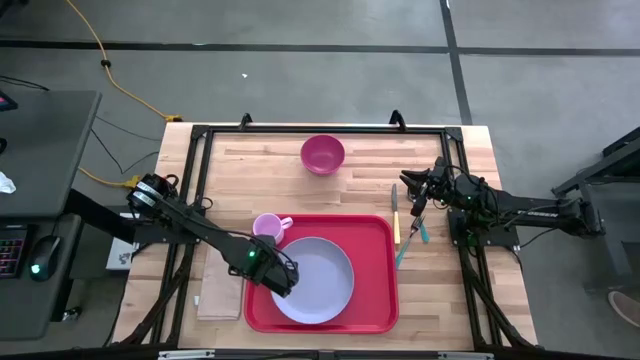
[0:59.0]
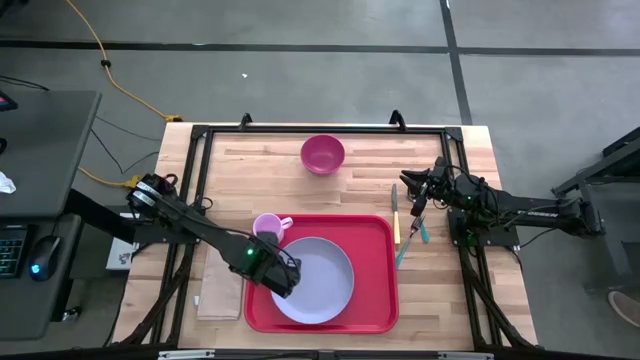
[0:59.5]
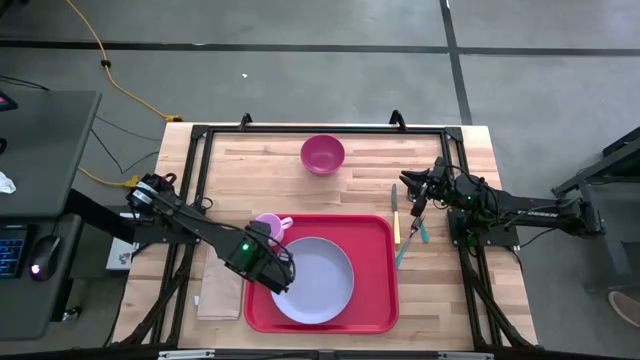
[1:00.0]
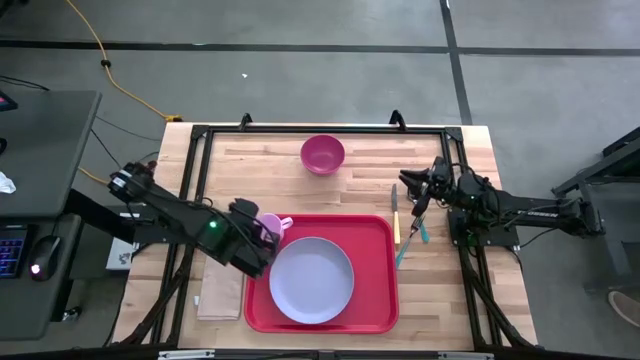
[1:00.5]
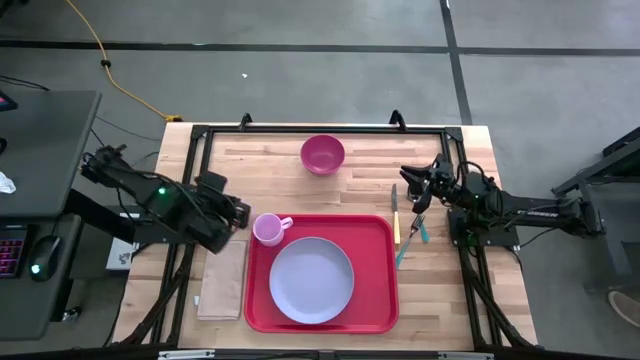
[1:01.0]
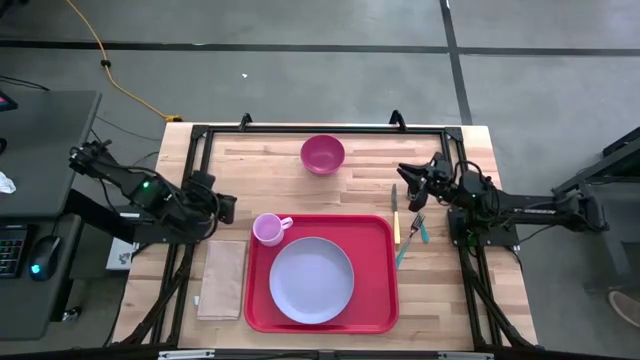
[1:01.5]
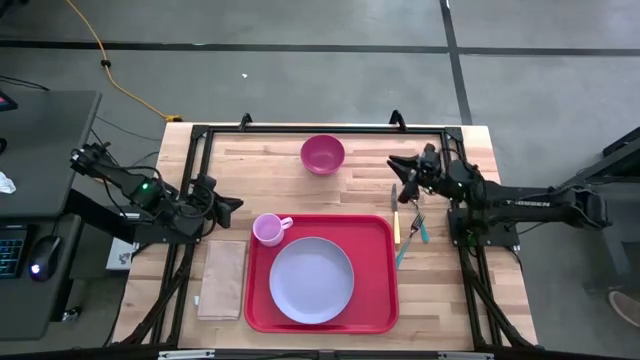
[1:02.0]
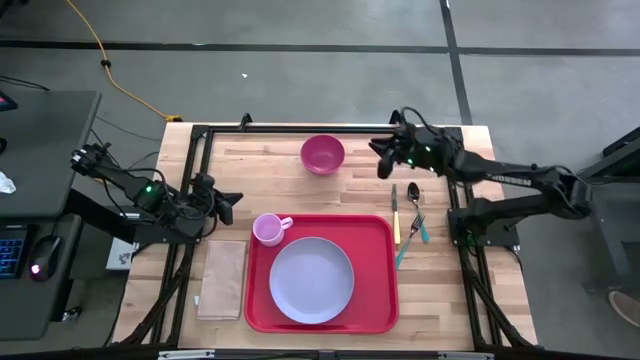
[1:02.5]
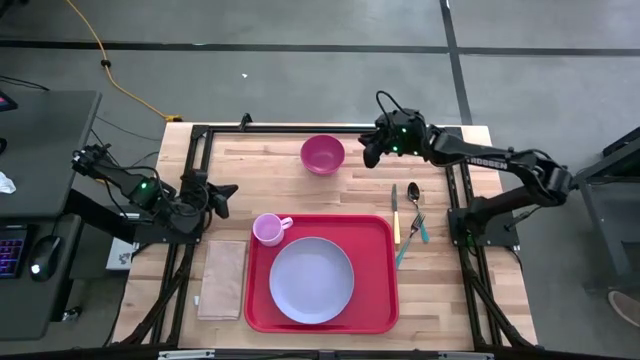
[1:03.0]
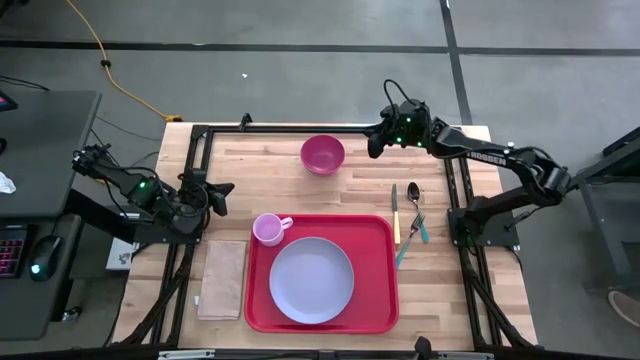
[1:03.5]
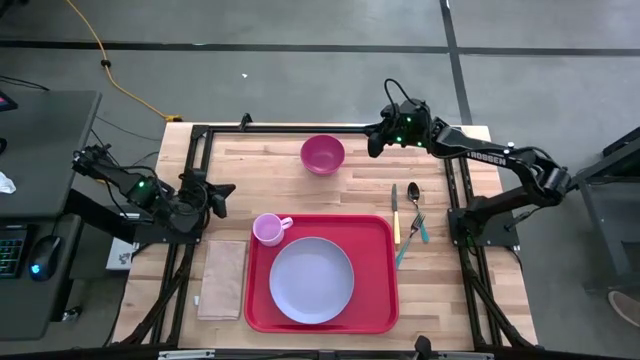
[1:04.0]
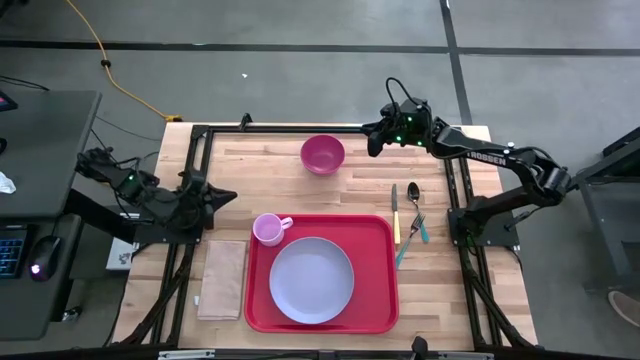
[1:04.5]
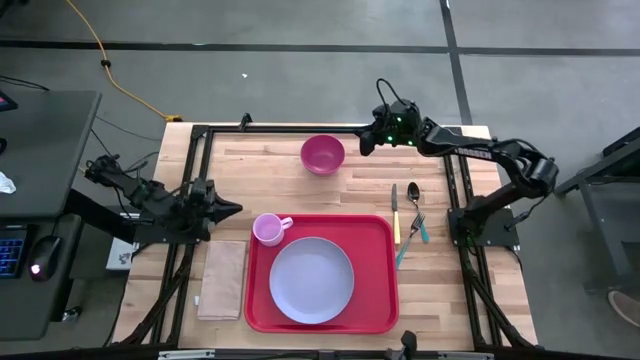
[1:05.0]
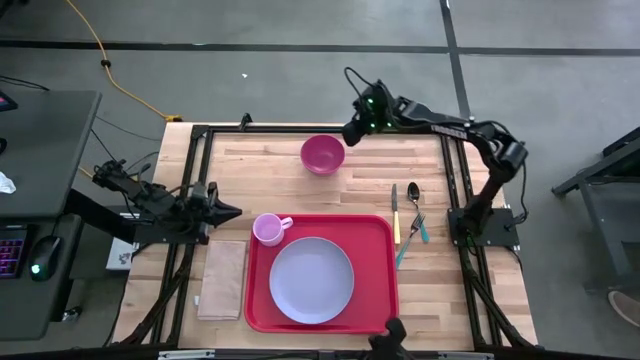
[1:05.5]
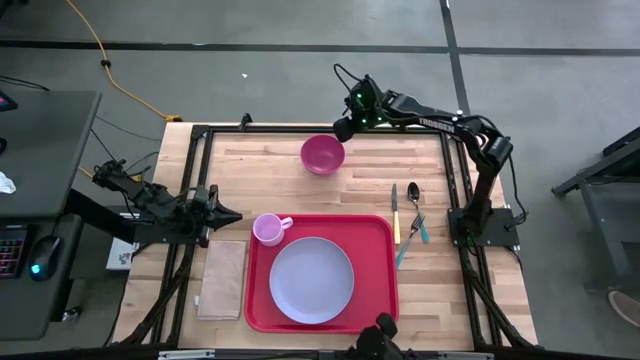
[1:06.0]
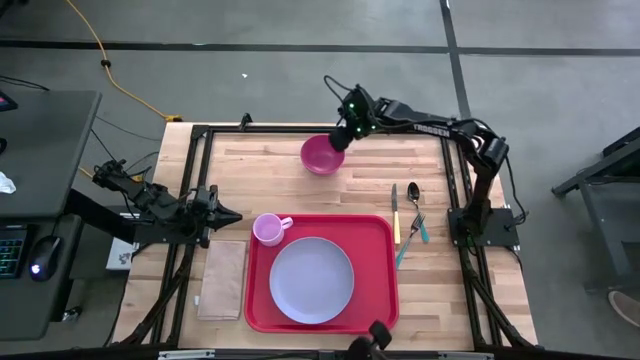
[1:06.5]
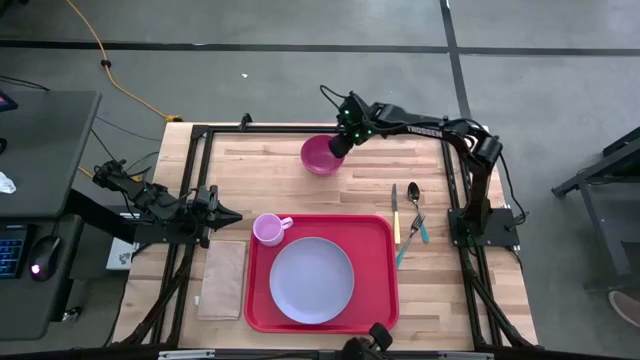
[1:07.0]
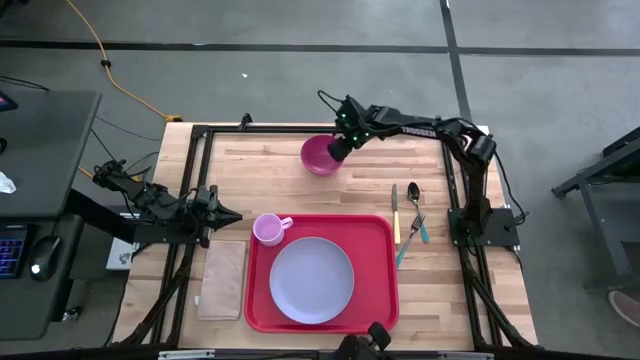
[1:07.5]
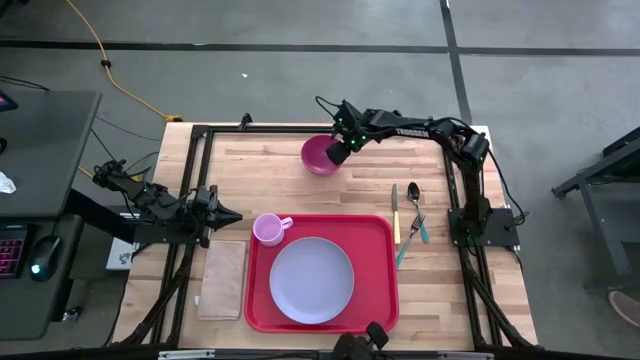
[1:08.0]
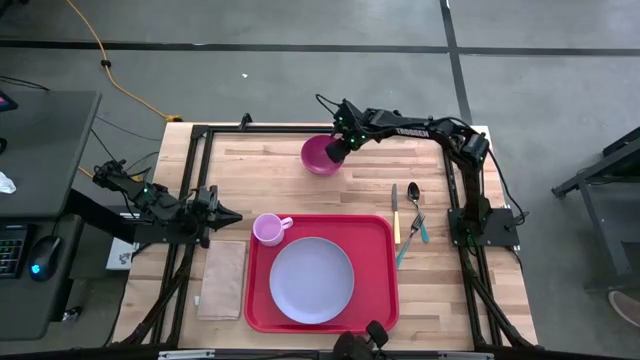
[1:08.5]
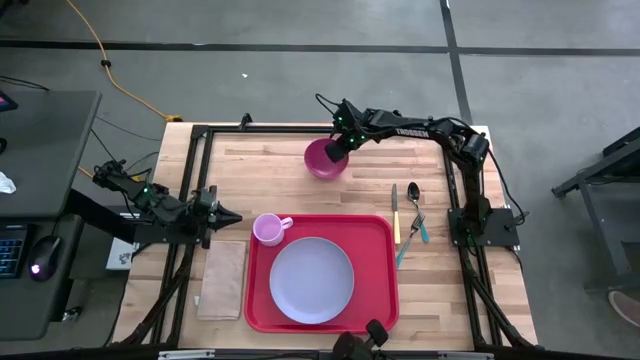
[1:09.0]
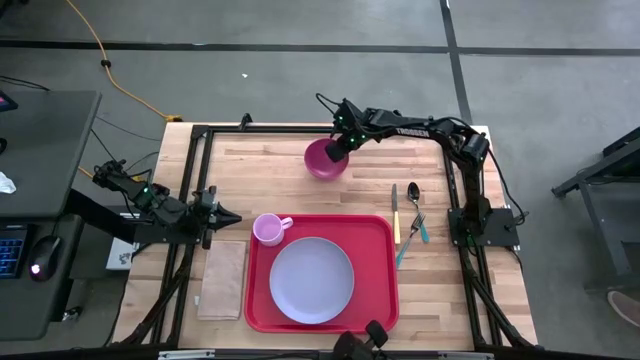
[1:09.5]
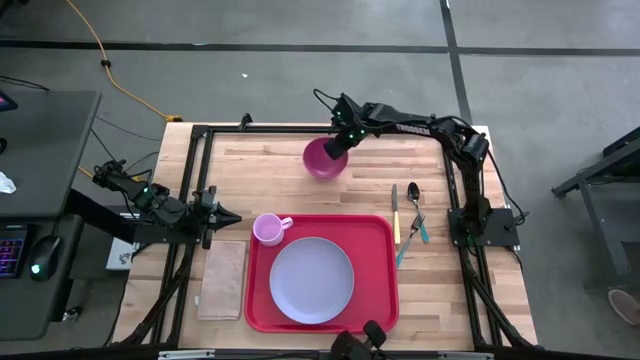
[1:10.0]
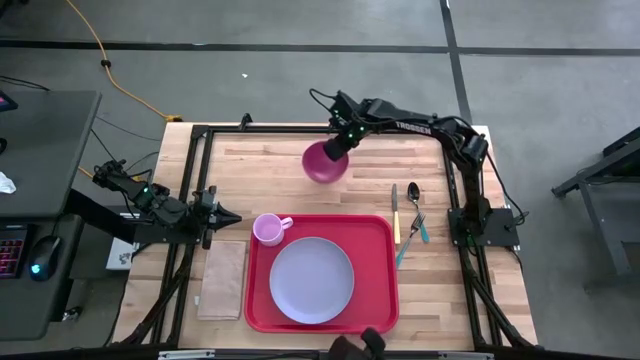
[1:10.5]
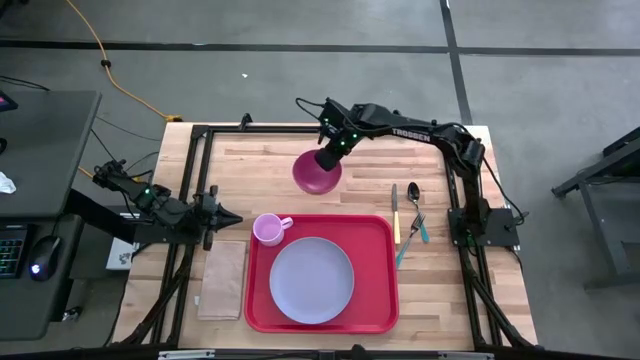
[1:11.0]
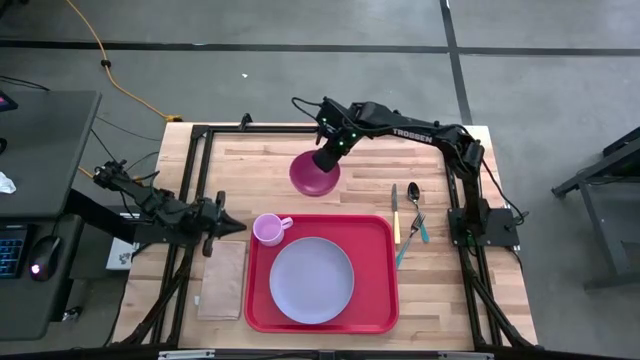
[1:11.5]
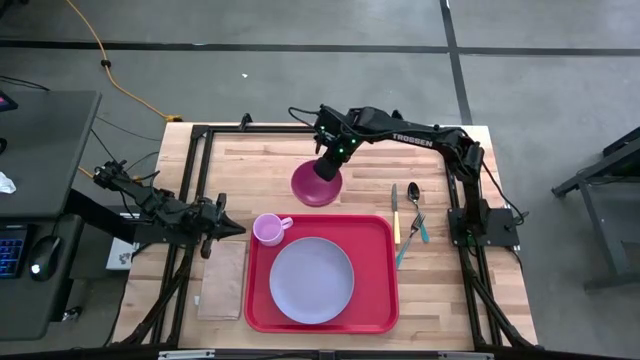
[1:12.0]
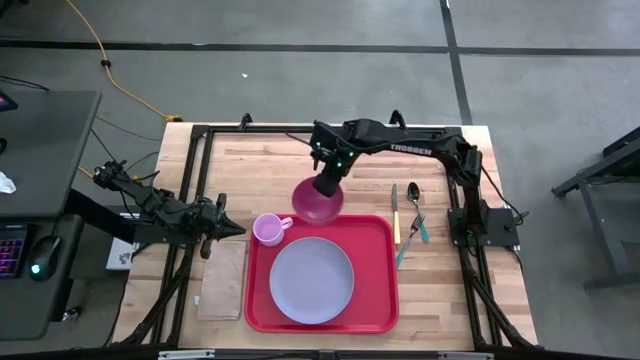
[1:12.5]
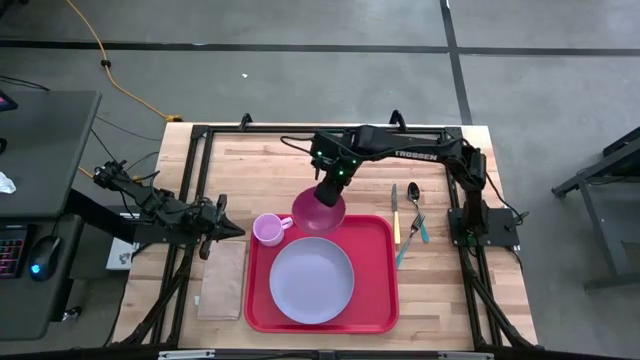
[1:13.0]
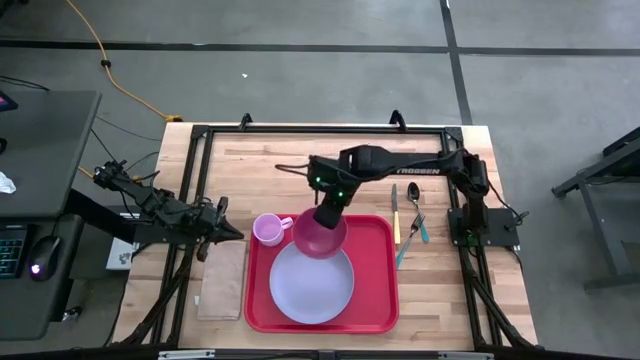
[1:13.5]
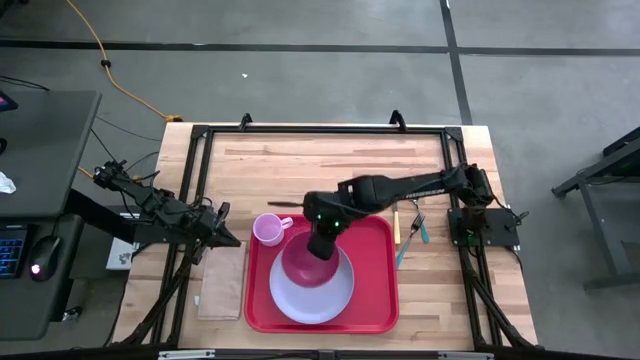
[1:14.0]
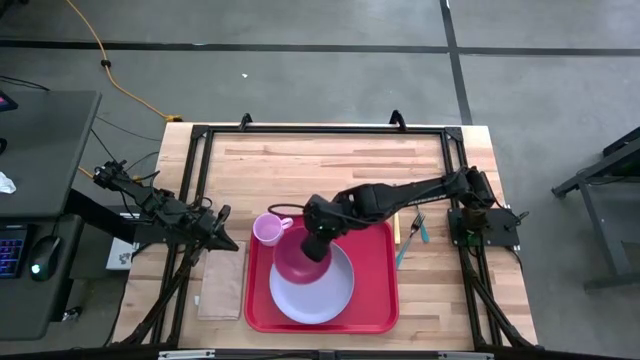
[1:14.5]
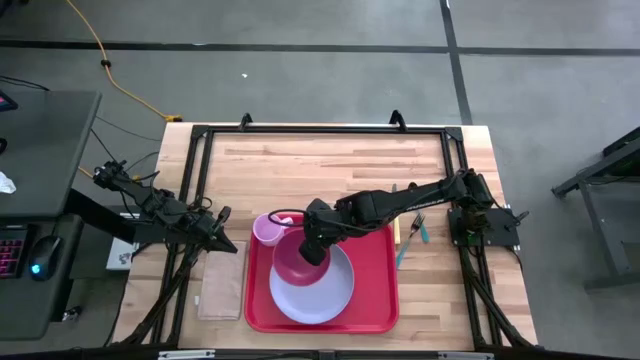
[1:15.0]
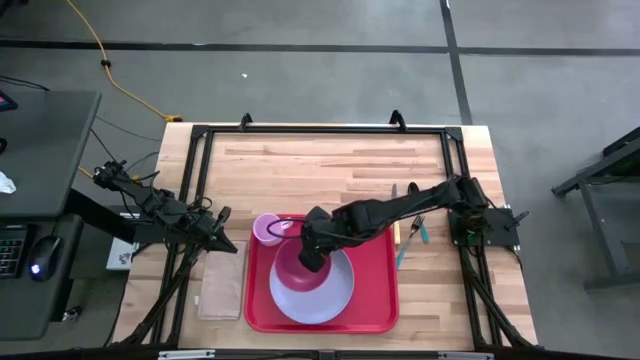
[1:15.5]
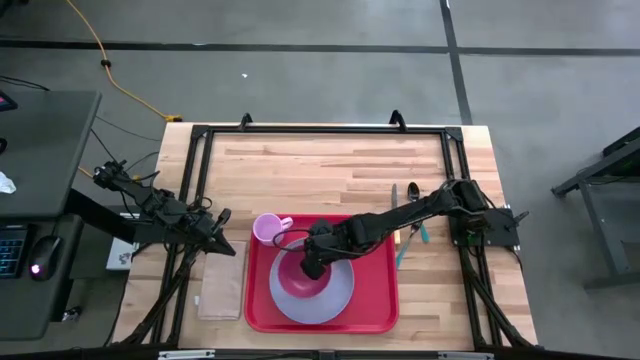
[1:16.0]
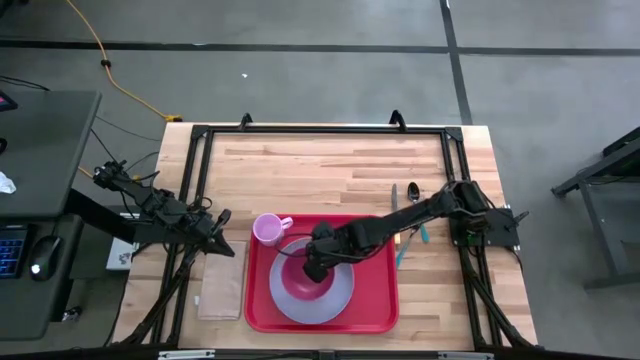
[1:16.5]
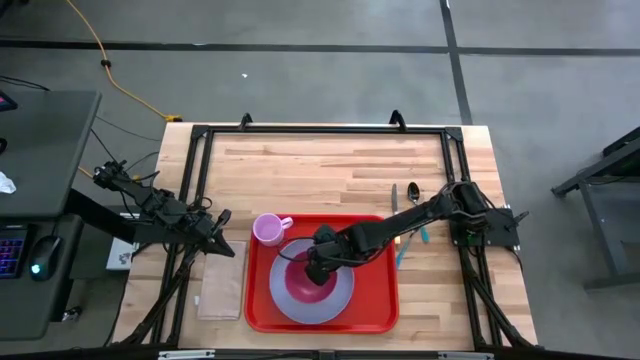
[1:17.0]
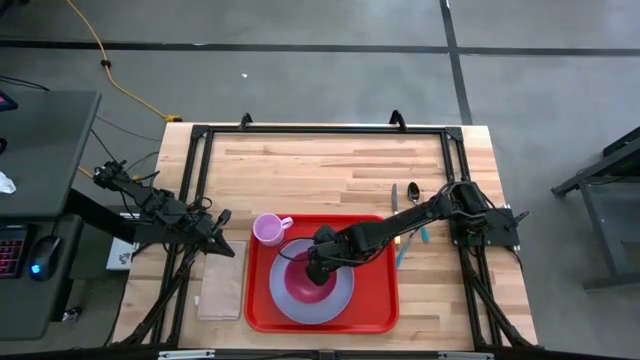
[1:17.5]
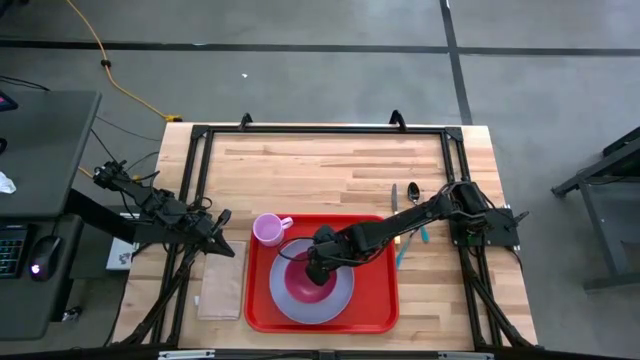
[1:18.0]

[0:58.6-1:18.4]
Task: Set up tray
Put the pink bowl on the purple plate

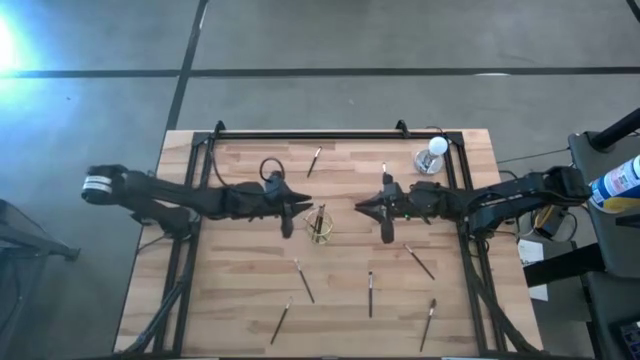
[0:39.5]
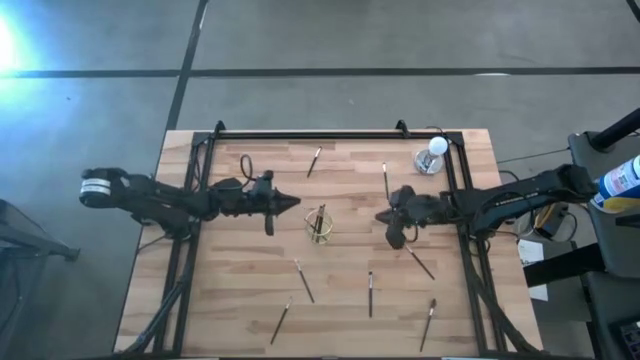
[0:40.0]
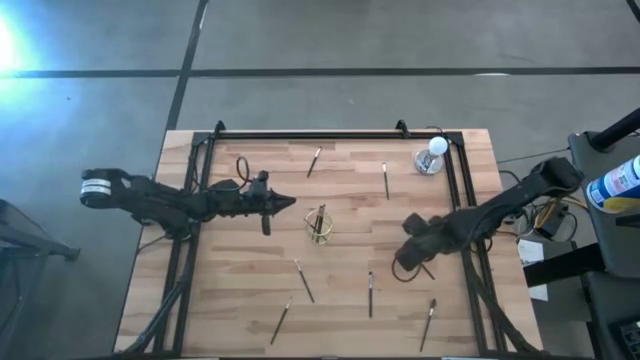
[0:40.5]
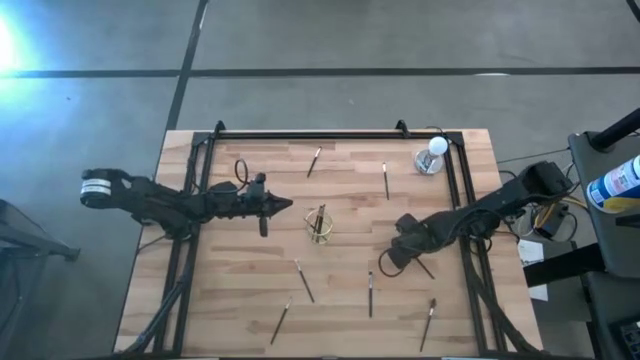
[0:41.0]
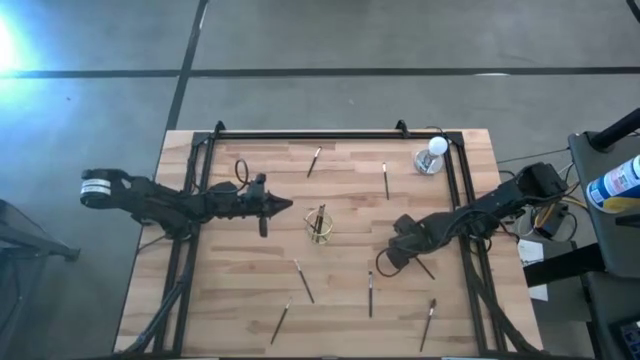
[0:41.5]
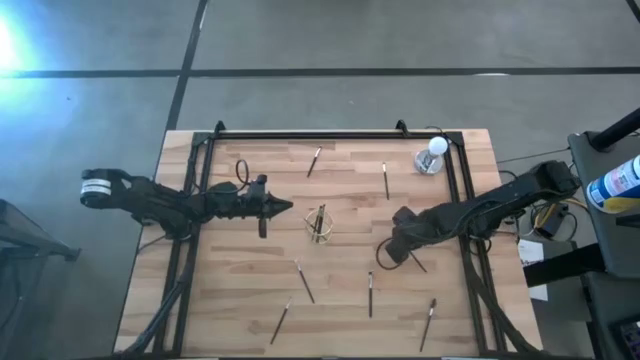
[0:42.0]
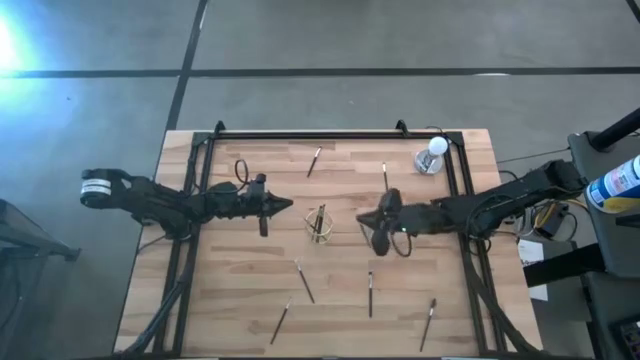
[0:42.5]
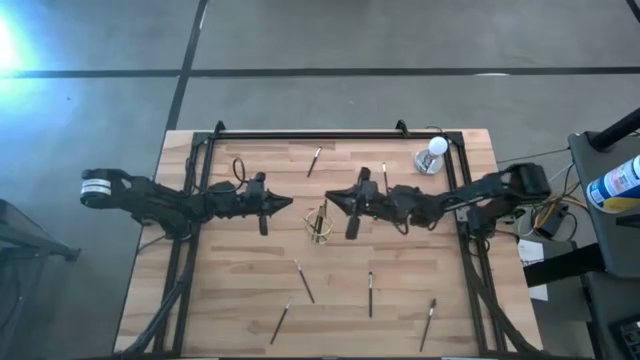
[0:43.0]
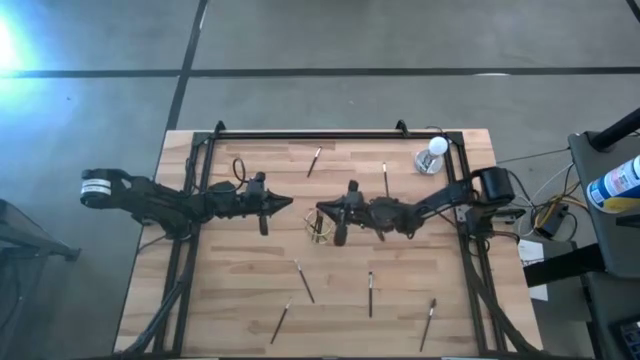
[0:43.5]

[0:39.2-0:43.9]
Task: Pick & Place Makeup Brushes
Put the eyeshadow brush into the gold makeup brush holder
